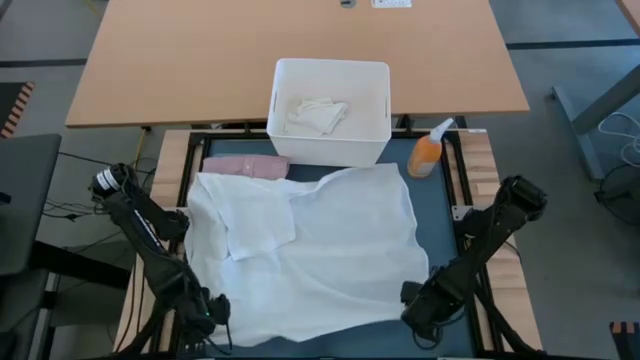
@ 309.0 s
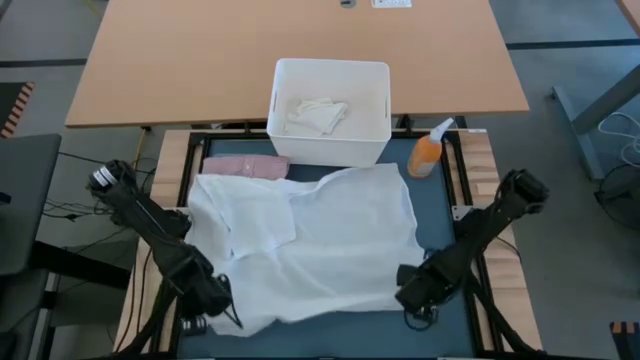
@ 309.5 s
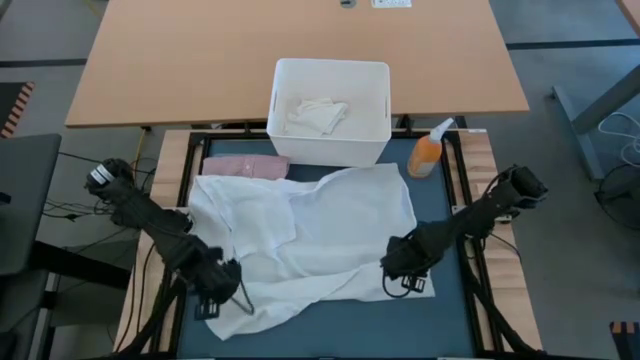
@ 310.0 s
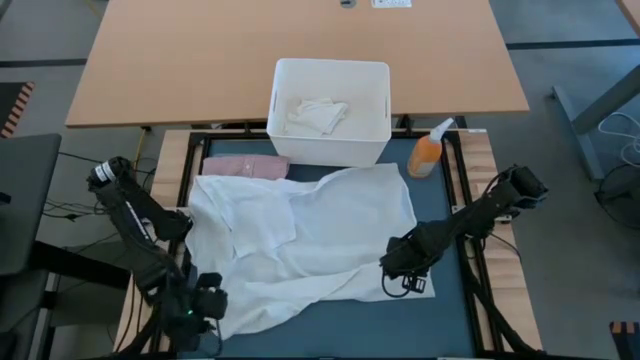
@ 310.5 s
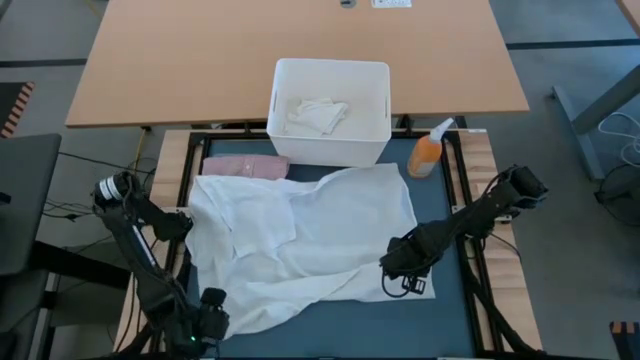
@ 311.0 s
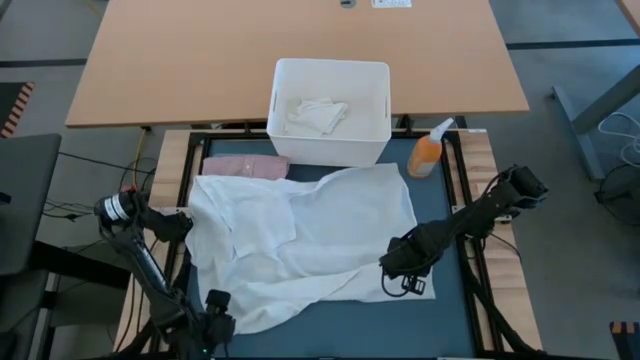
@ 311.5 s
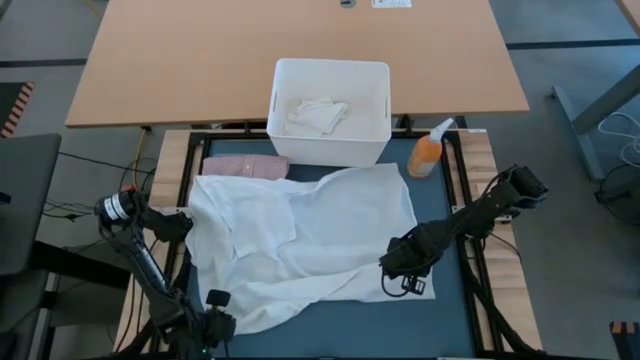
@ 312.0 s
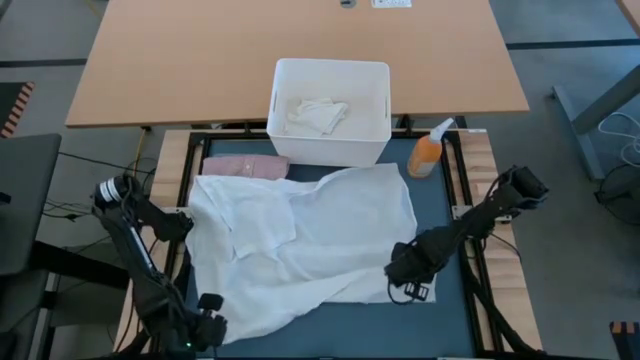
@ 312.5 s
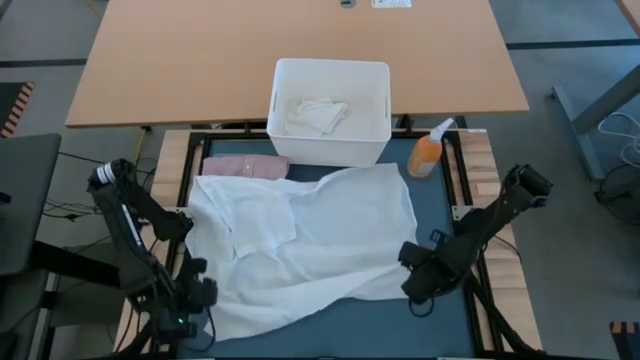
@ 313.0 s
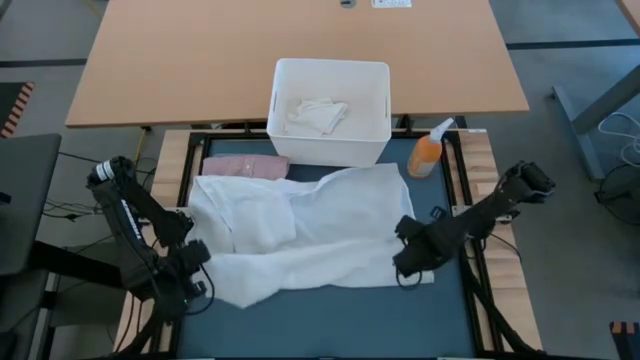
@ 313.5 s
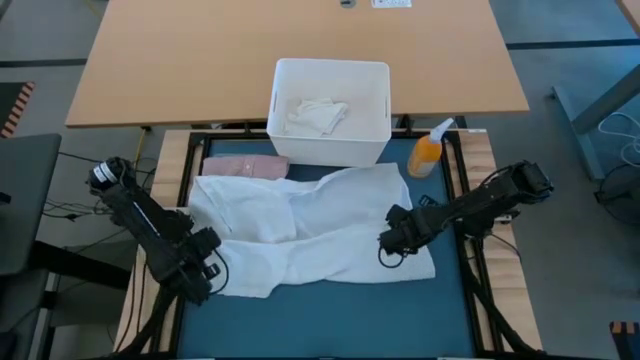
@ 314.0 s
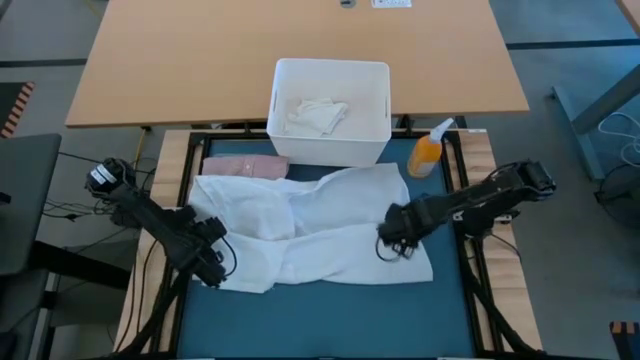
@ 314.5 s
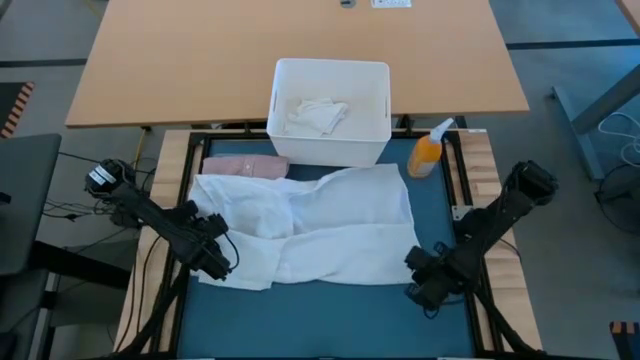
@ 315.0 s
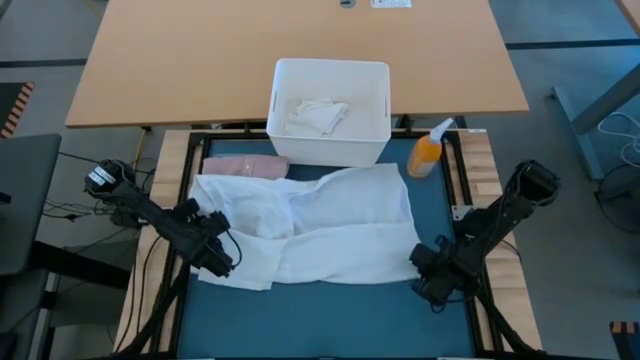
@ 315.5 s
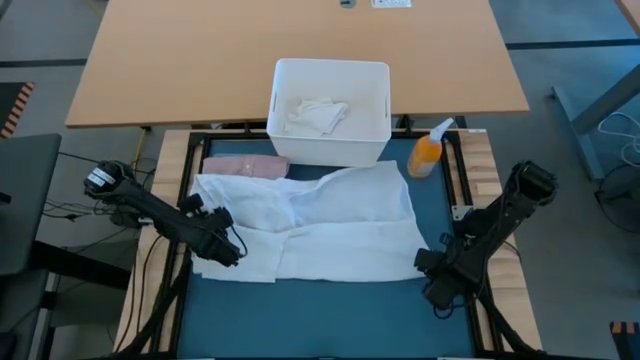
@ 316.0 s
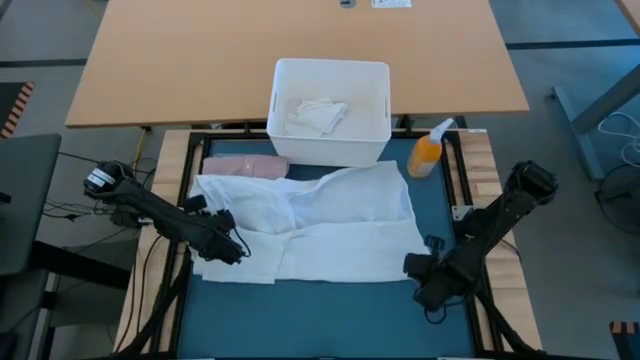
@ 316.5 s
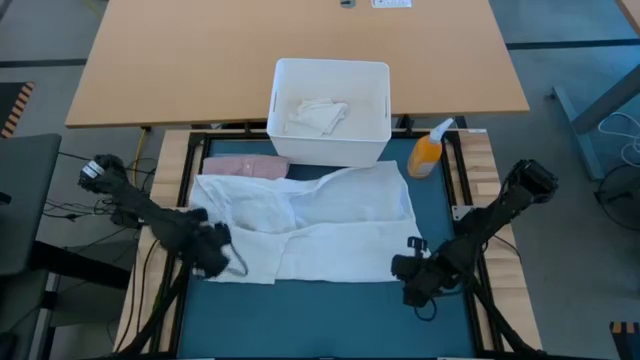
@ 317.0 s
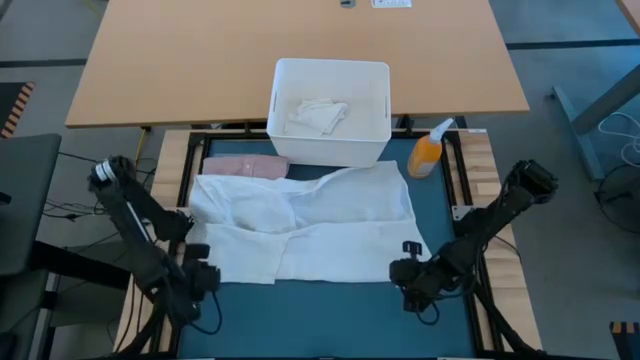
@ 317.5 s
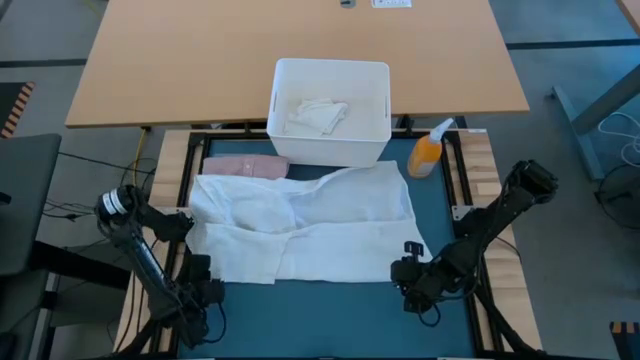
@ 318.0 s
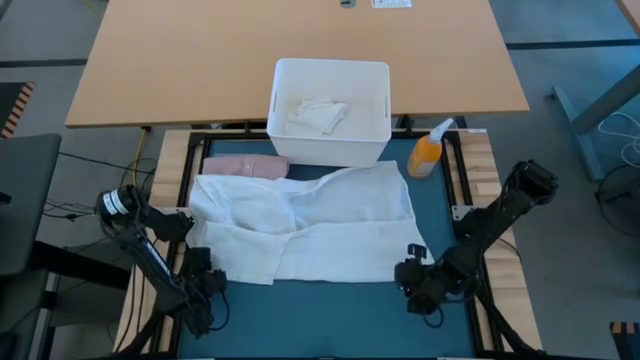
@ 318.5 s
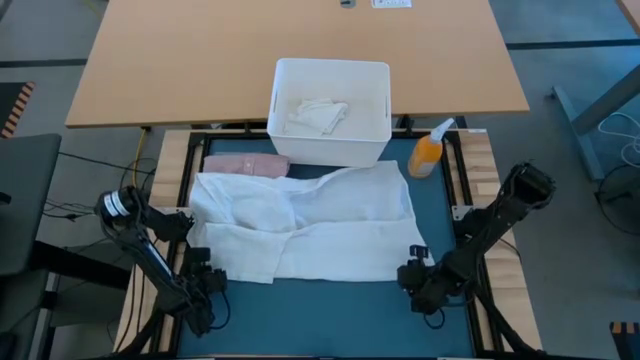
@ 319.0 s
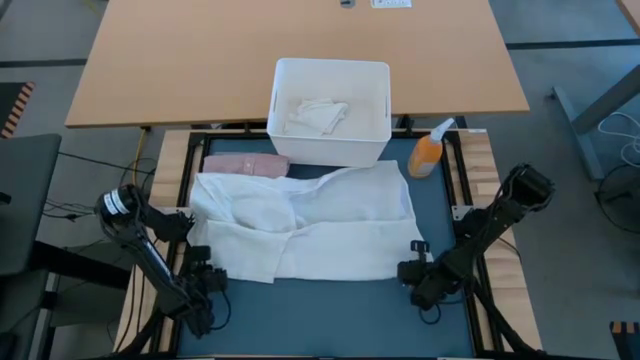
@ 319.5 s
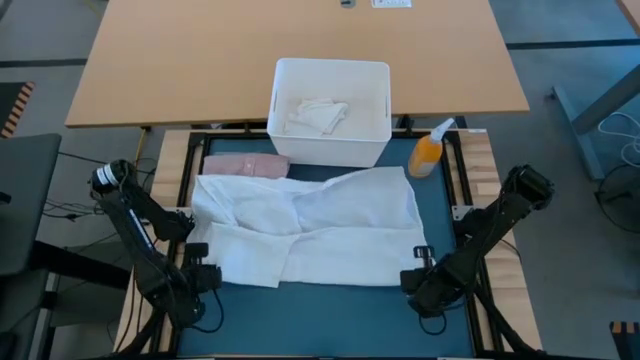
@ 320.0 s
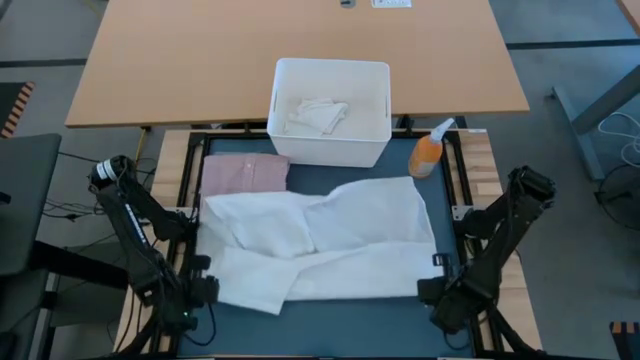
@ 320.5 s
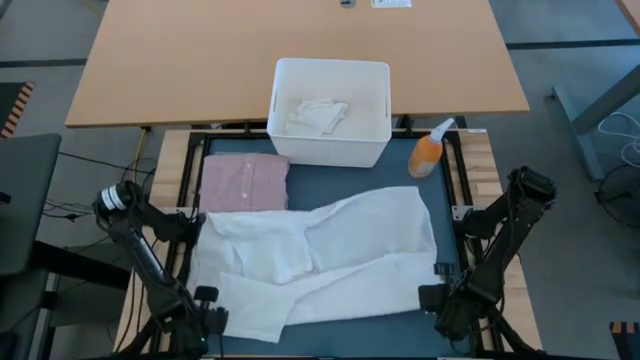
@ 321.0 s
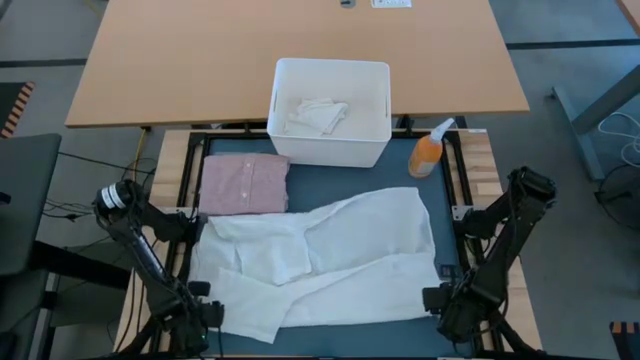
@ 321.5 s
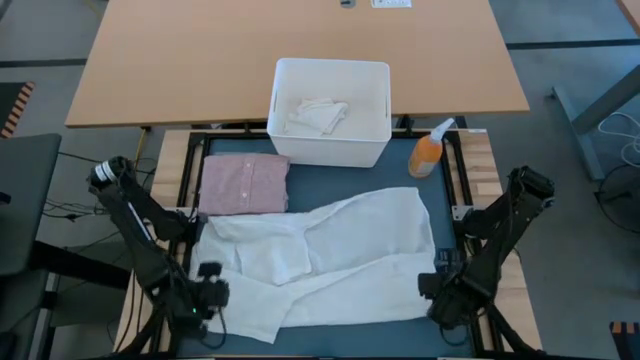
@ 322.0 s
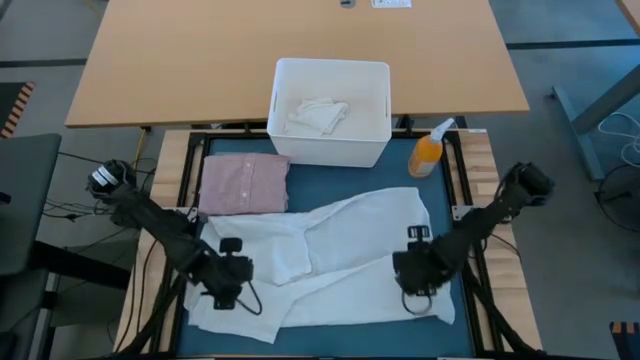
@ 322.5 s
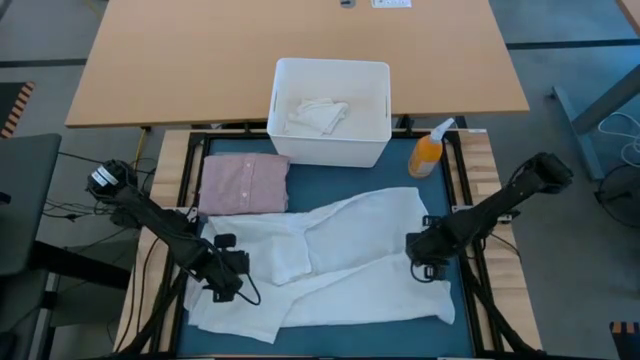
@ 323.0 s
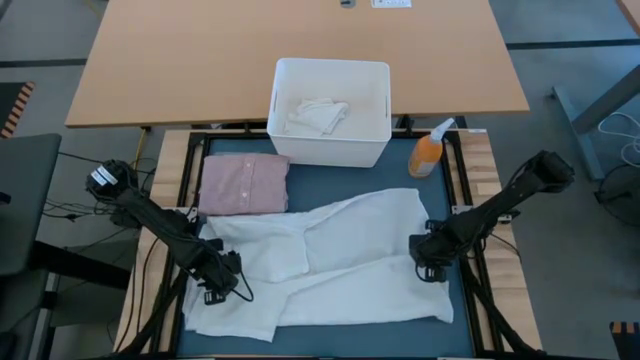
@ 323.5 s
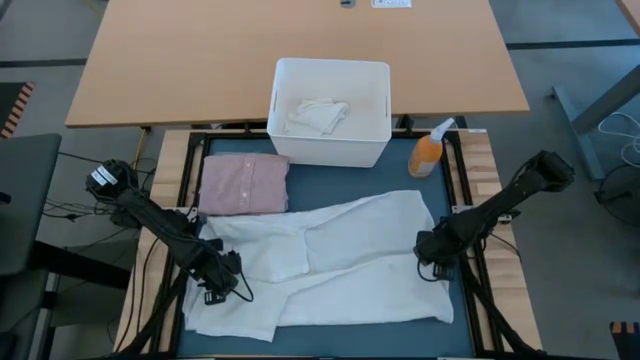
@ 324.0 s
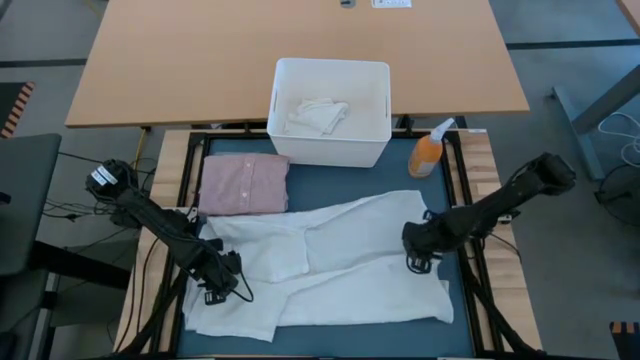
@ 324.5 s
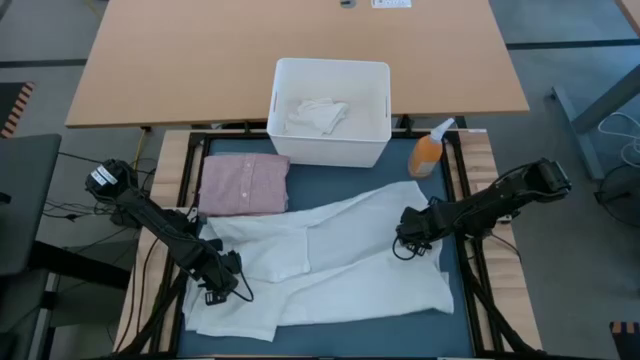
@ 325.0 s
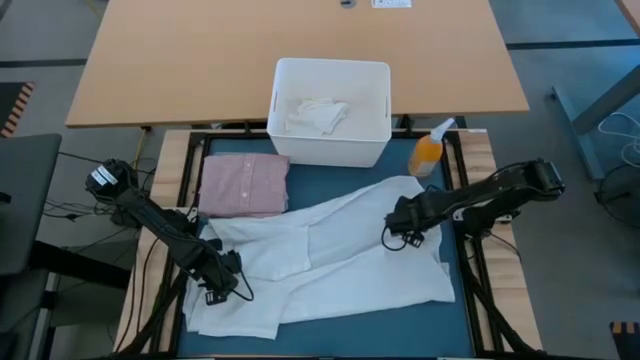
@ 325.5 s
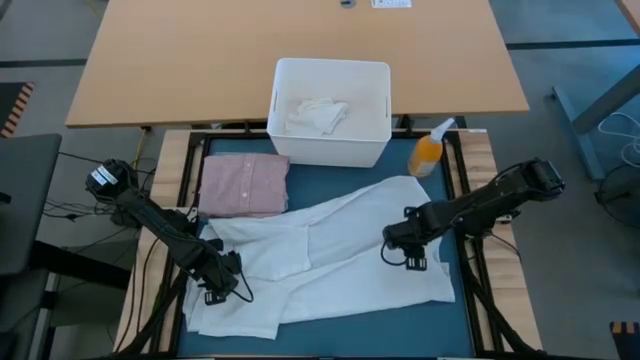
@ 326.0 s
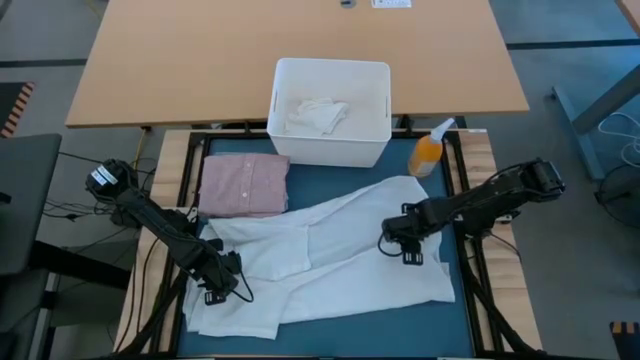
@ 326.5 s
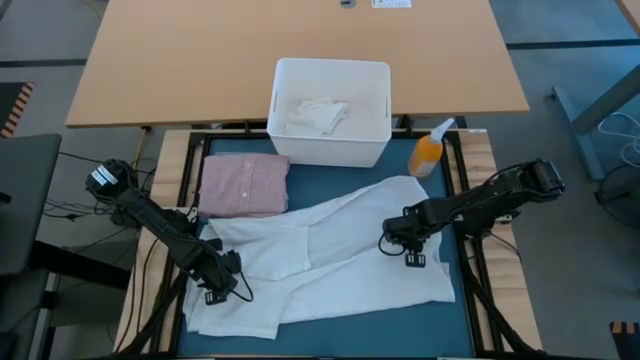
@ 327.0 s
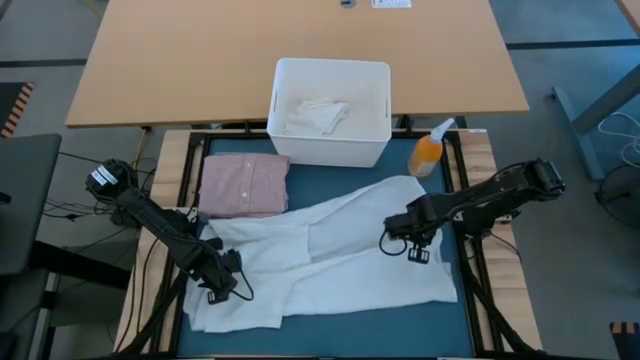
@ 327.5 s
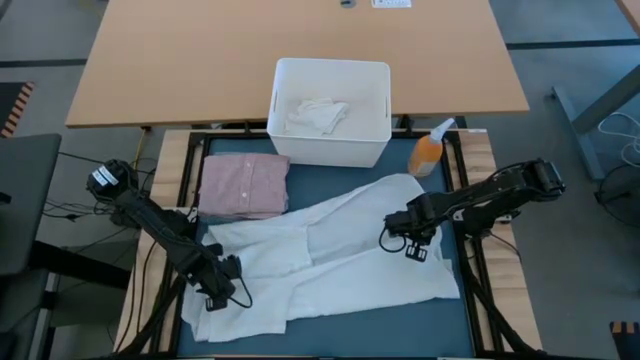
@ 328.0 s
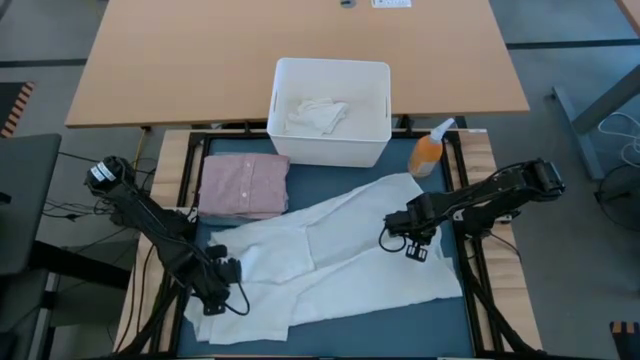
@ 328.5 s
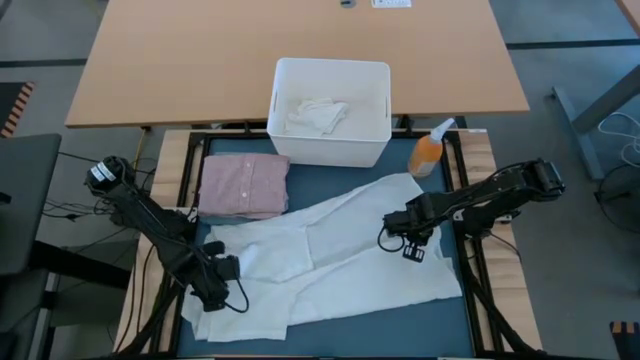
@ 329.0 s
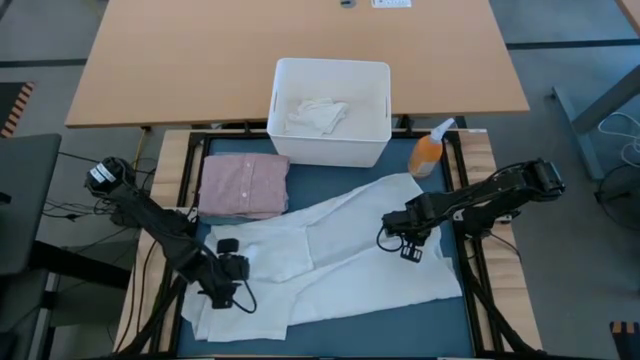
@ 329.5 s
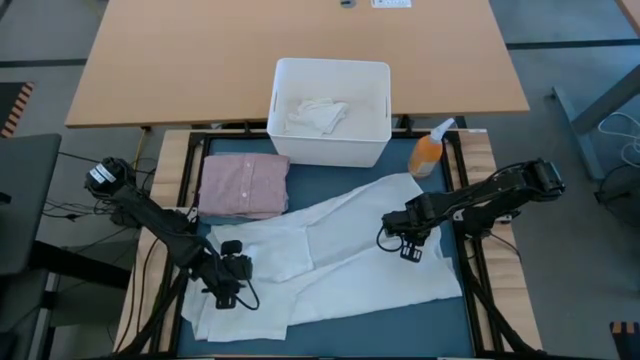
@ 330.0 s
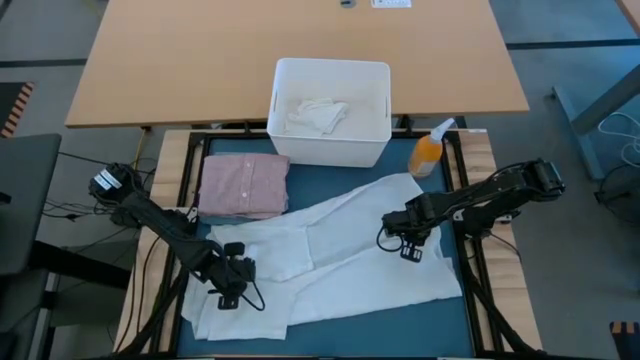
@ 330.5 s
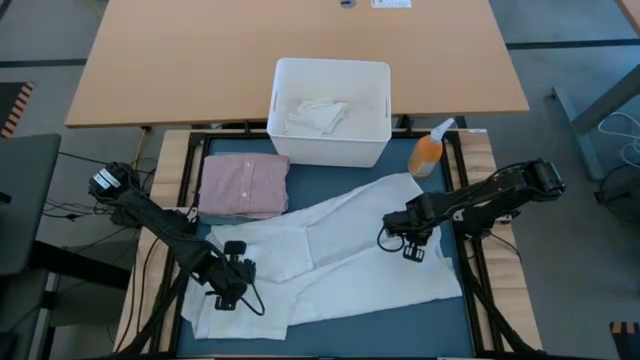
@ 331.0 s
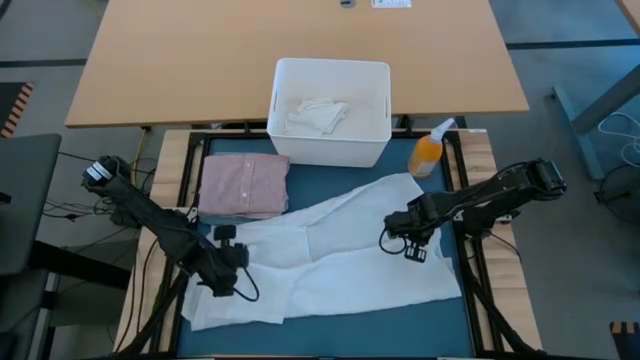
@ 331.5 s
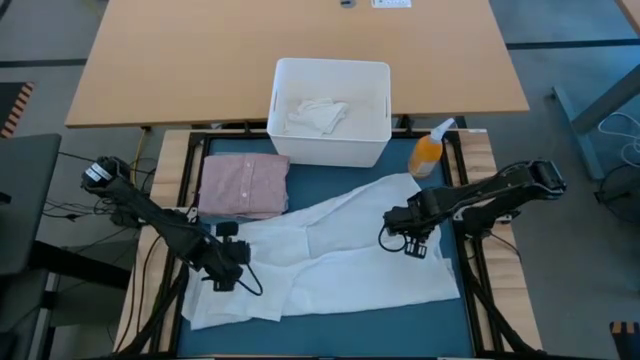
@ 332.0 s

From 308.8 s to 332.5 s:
Task: Fold Laundry from Bin
Fold the white shirt
